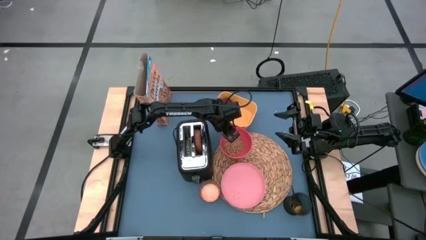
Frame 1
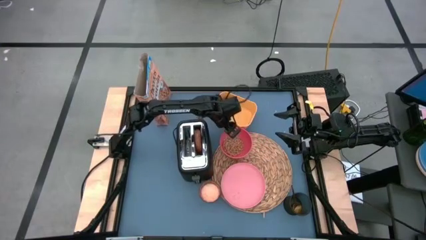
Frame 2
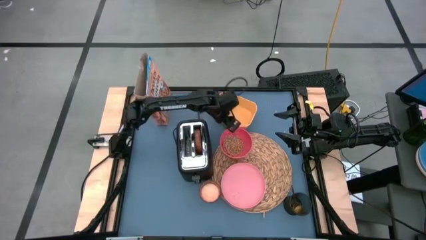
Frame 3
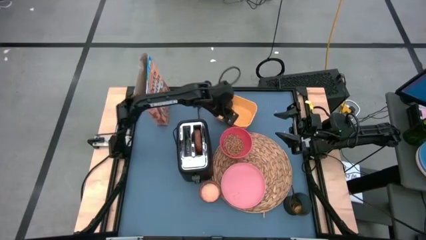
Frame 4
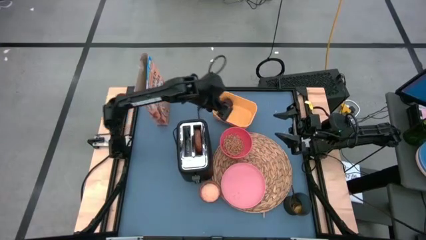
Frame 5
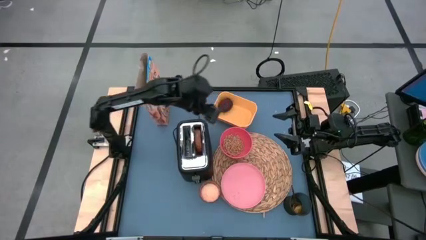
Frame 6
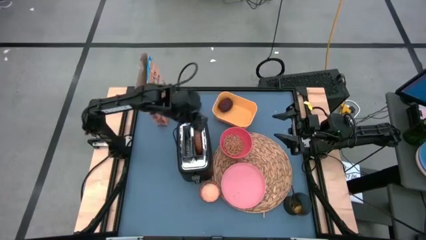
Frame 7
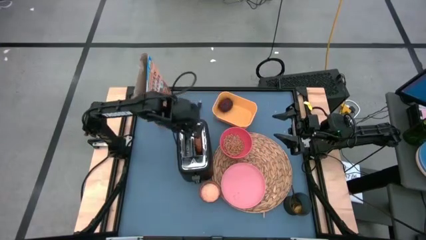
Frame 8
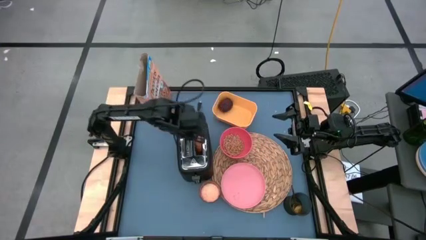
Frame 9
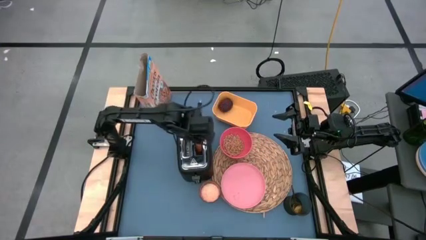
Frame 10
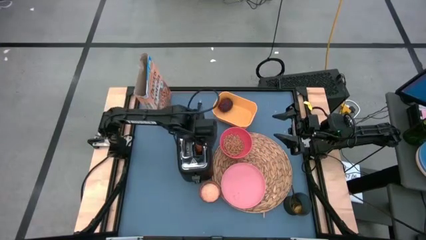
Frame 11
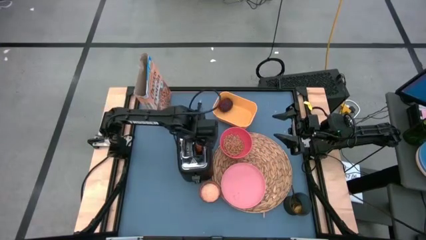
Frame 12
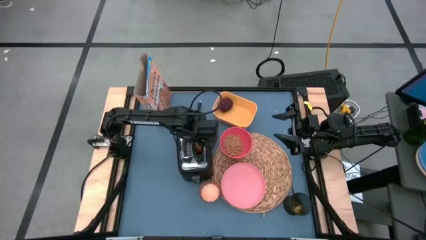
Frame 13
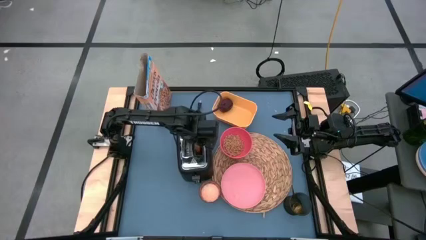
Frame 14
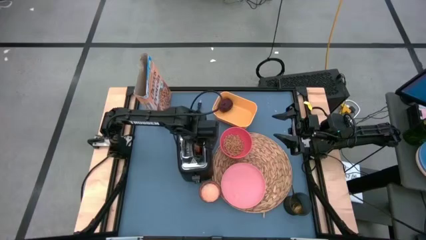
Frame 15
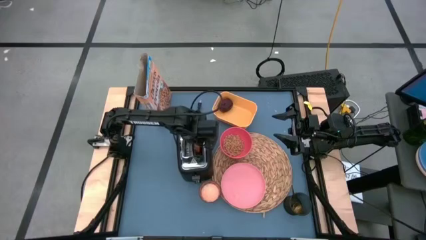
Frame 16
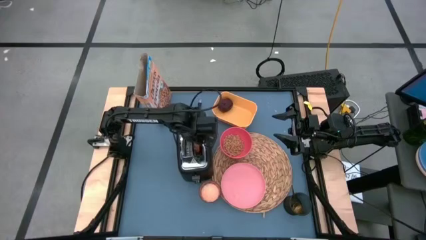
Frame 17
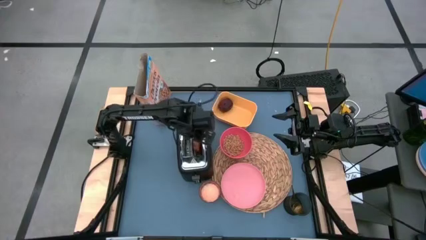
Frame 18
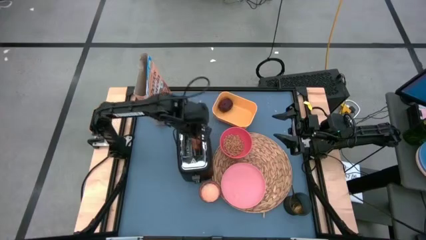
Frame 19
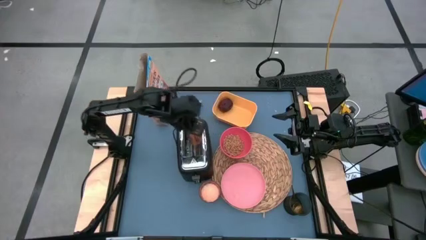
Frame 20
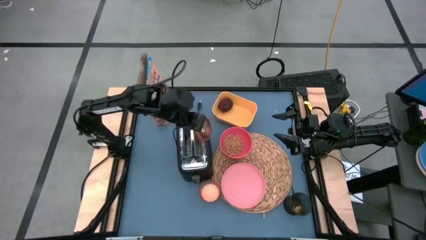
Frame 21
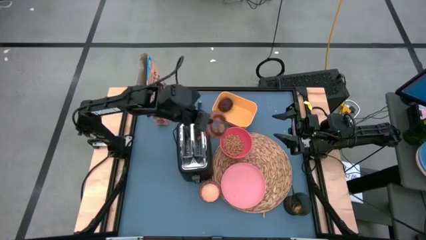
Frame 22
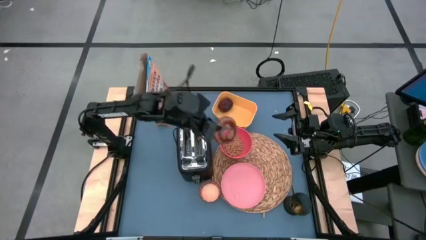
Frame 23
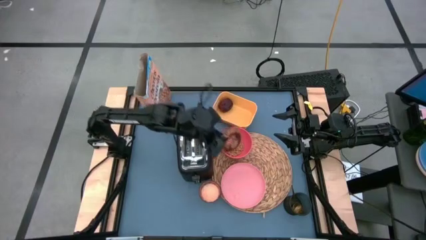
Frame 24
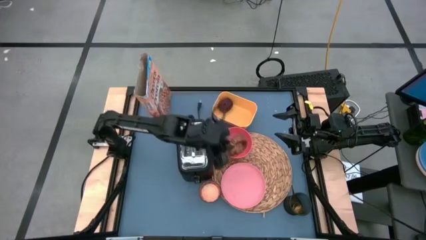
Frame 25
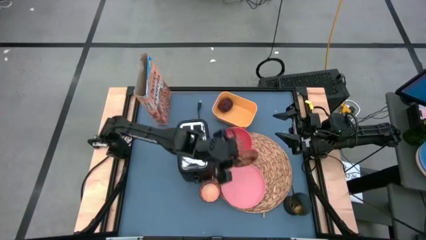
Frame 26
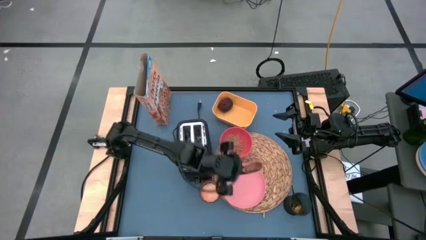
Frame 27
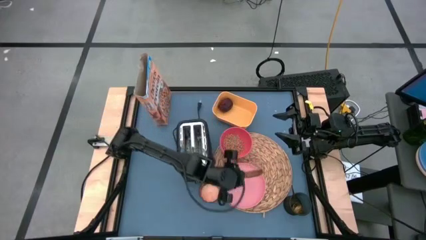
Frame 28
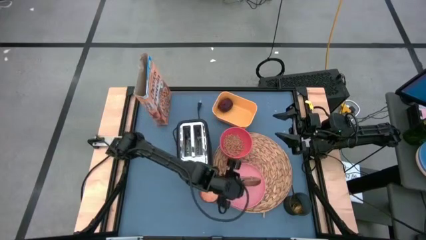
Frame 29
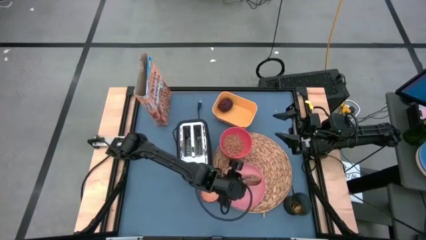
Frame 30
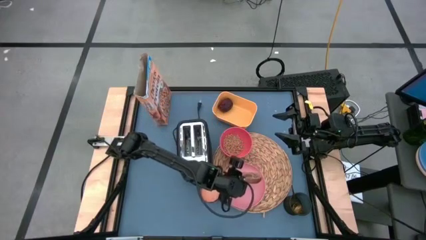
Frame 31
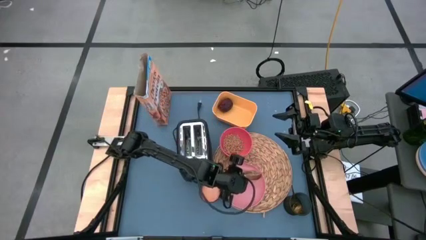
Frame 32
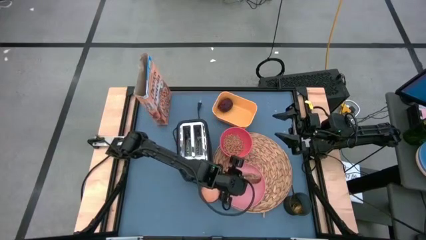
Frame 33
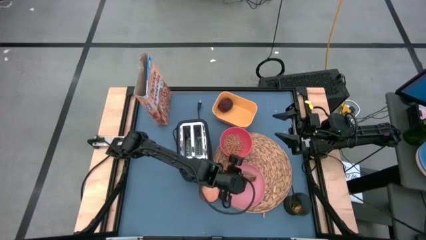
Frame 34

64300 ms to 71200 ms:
Task: Arrange a breakfast setting
Put the bread on the pink plate

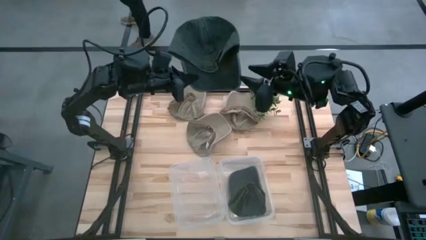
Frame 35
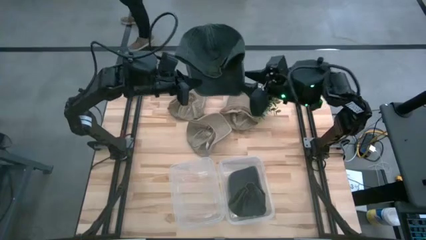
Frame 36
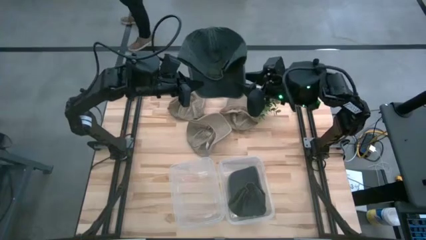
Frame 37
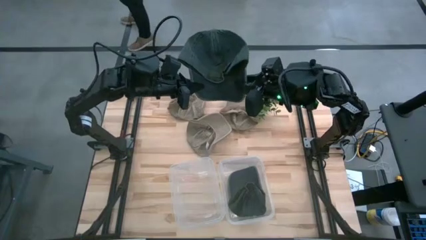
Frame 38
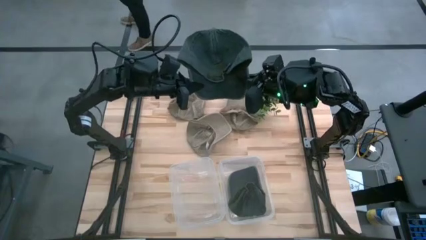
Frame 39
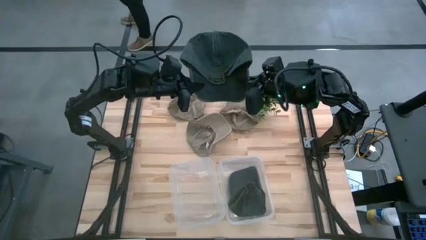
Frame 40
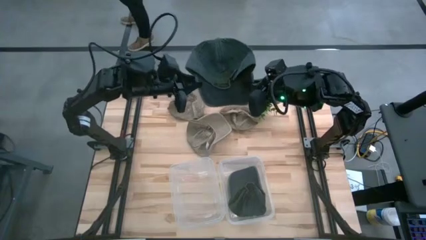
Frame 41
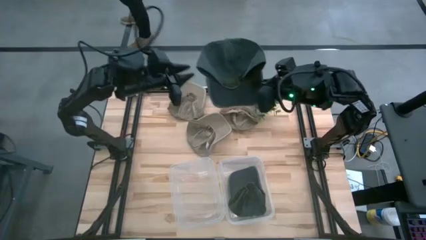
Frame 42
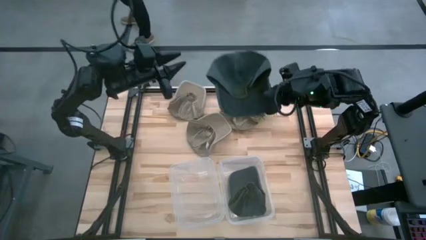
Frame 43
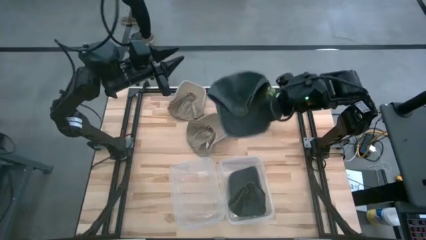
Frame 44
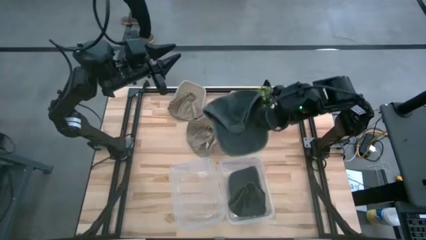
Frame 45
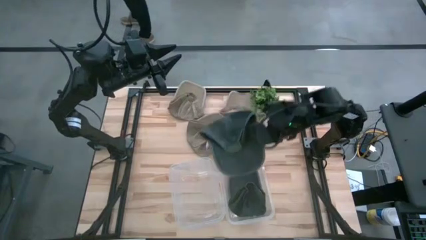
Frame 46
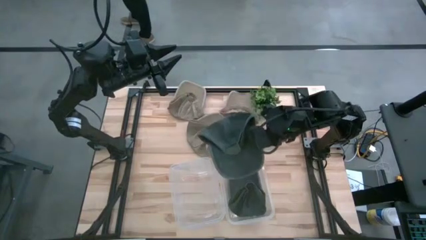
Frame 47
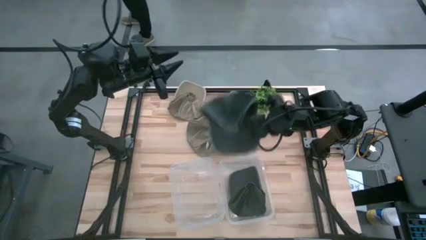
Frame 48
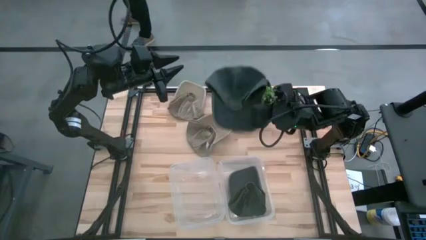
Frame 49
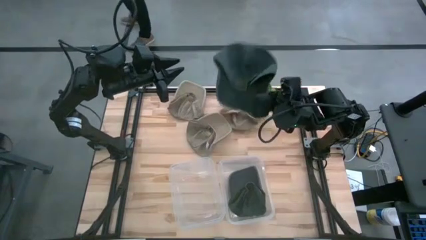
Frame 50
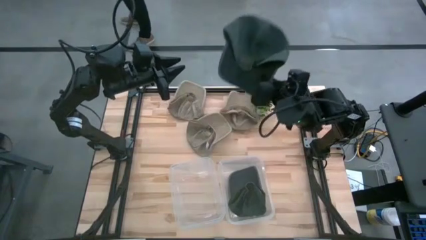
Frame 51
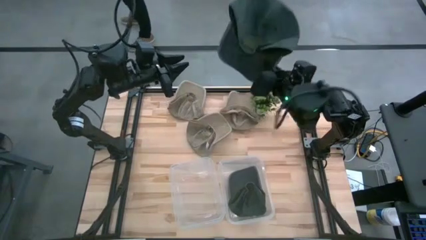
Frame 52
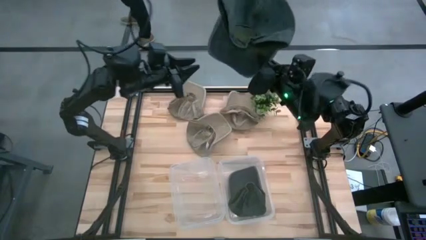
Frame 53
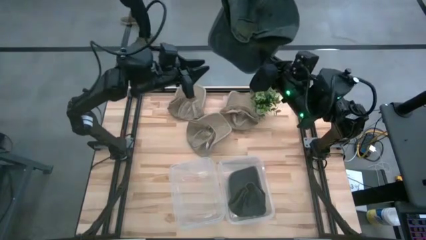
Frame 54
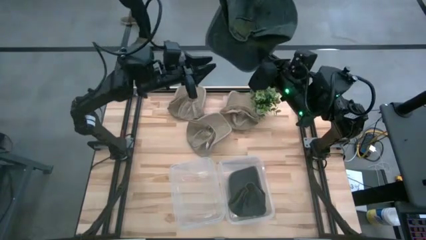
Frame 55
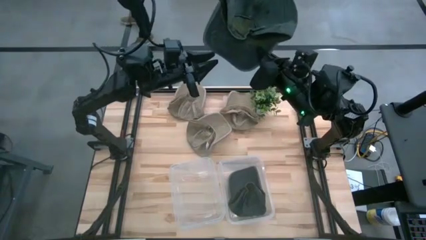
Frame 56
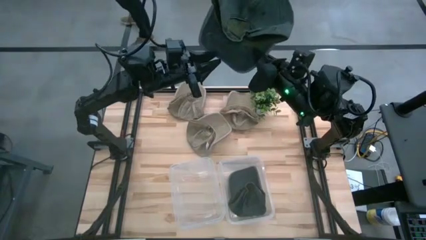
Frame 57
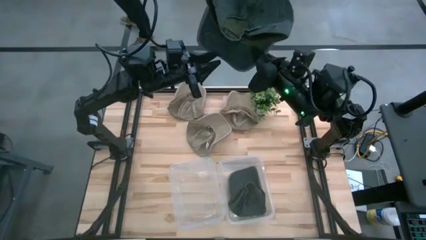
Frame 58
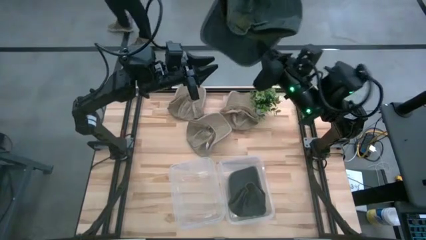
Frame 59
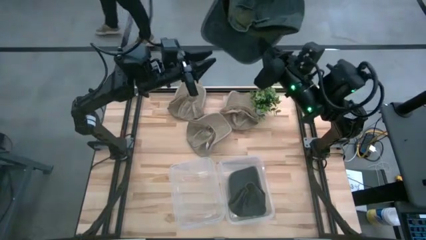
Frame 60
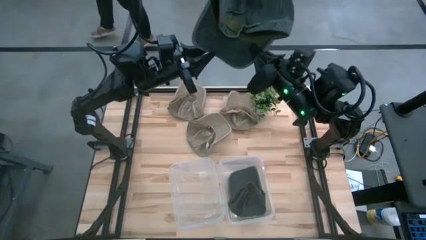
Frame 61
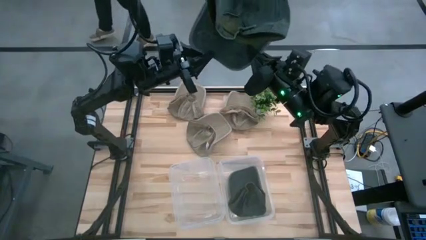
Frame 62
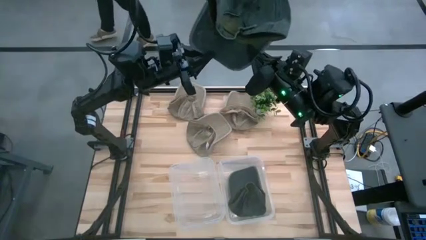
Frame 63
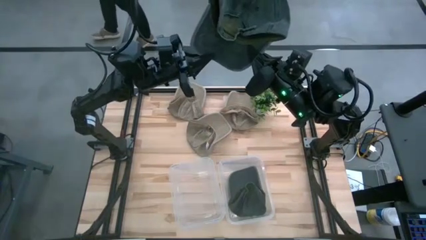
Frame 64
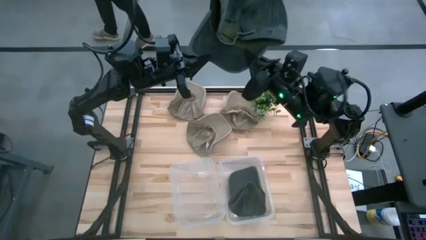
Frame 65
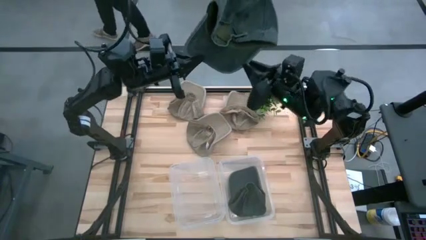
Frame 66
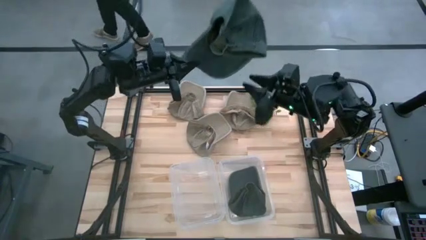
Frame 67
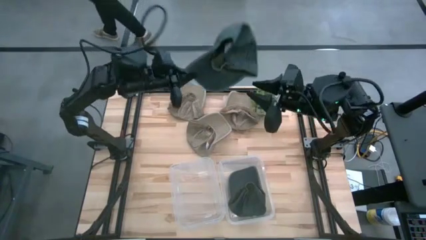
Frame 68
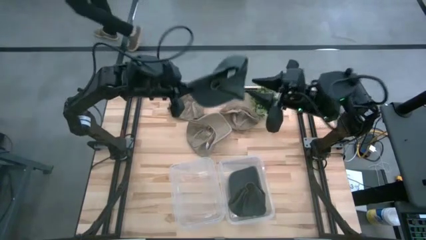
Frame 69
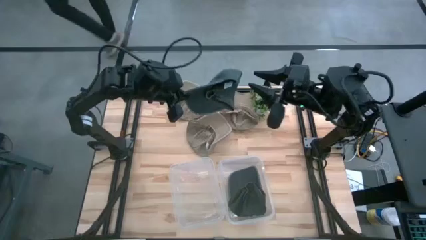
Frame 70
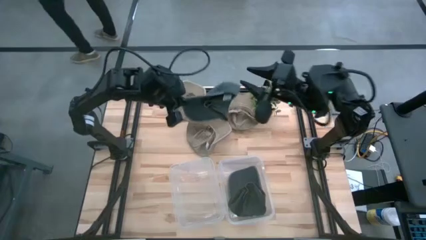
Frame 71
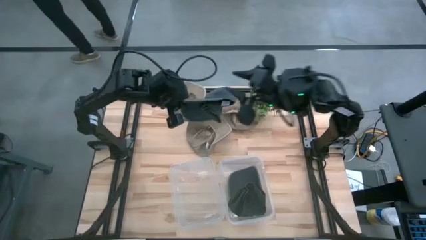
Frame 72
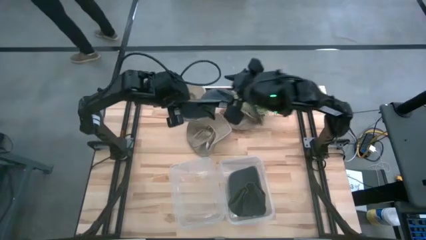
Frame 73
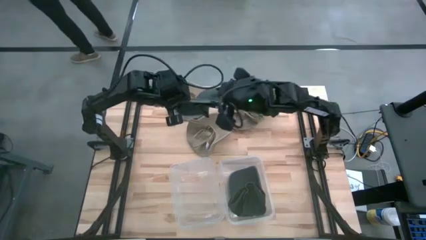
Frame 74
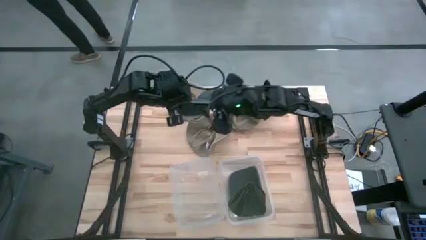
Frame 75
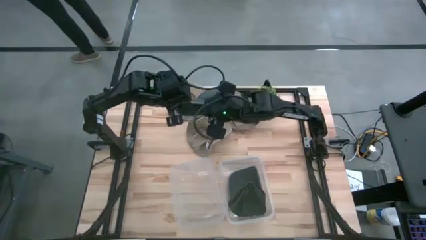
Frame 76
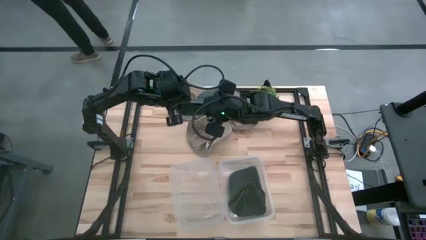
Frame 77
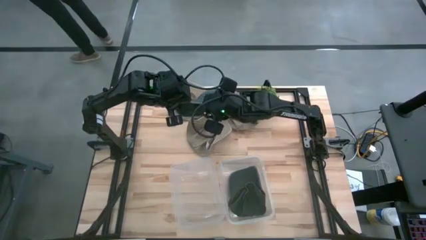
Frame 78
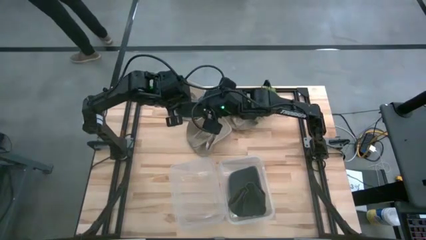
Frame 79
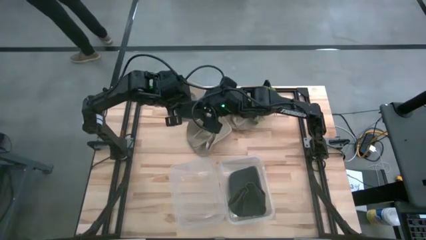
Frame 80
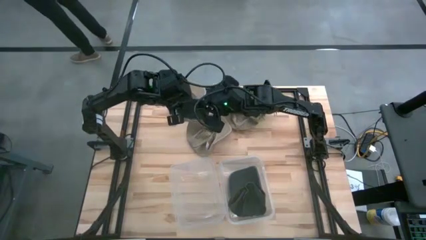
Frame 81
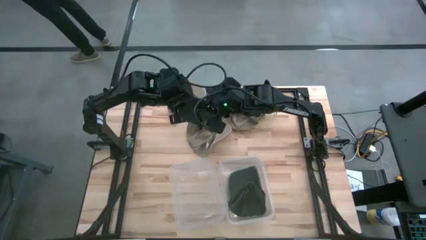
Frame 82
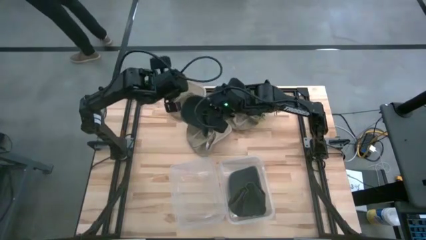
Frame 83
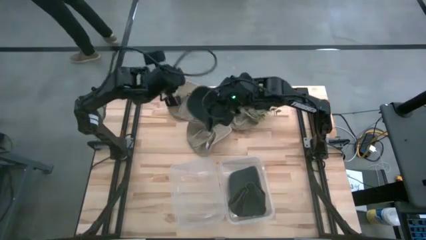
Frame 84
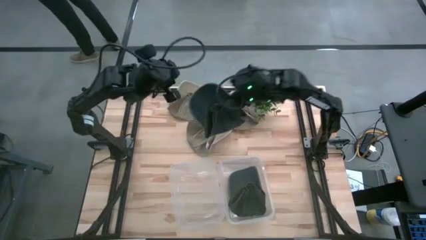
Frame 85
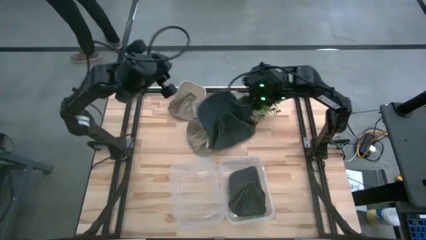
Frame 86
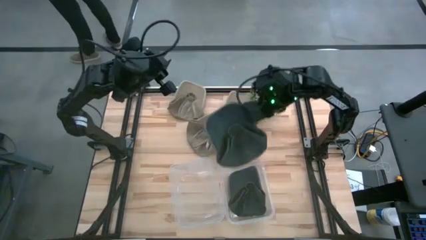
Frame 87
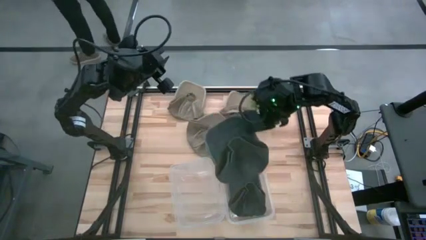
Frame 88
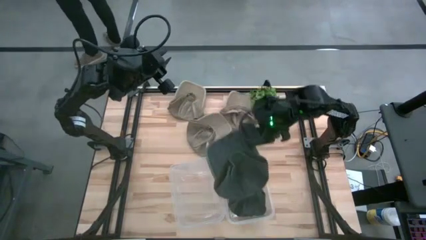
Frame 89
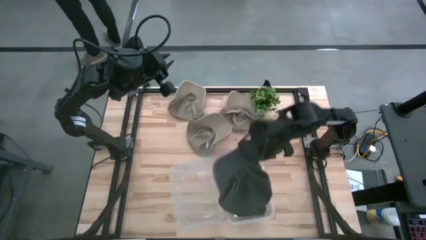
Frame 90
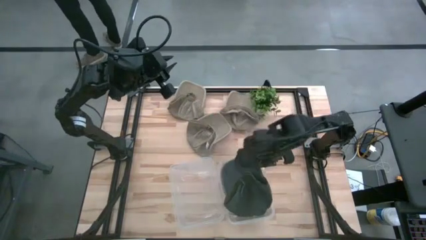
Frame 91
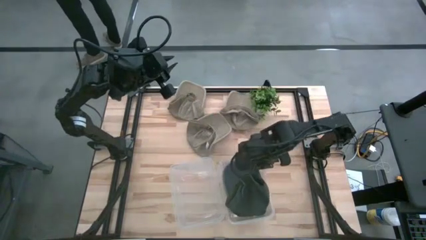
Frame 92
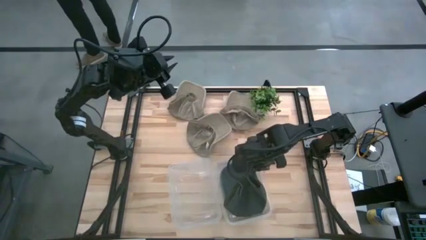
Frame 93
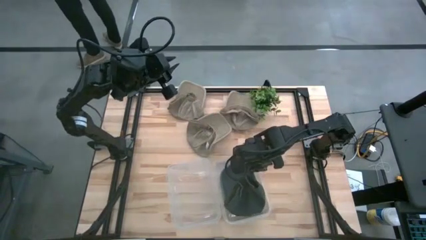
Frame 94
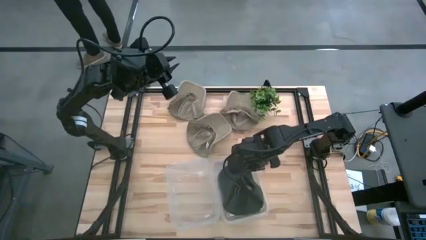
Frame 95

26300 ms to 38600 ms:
Task: Pick & Place hat
Put the black cap into the right transparent bin
